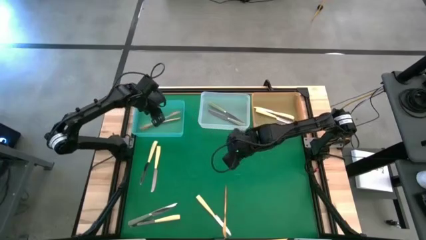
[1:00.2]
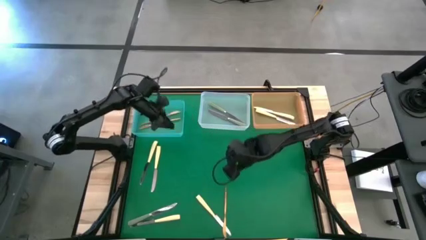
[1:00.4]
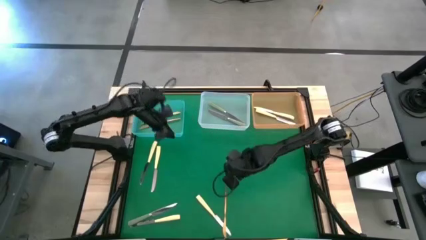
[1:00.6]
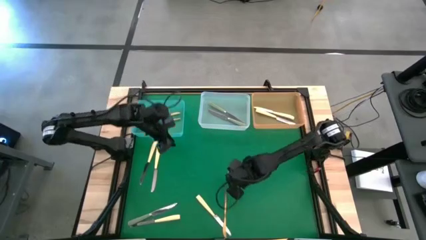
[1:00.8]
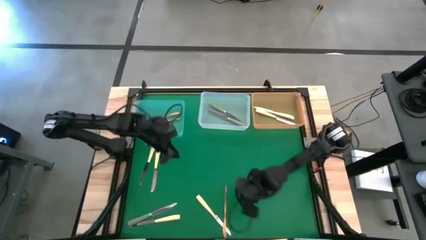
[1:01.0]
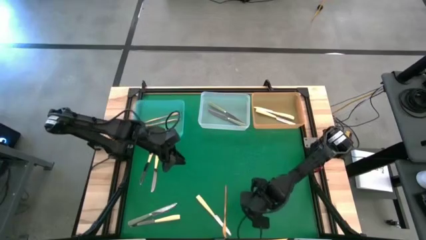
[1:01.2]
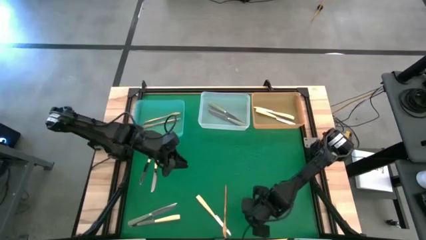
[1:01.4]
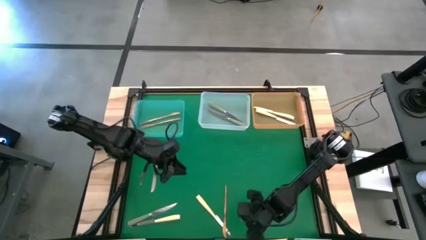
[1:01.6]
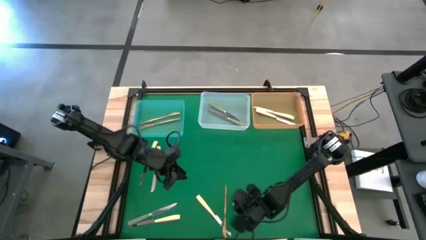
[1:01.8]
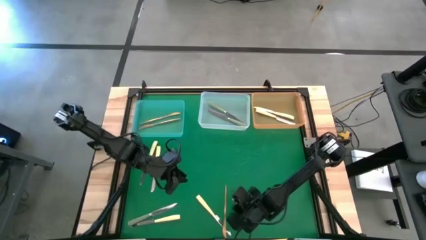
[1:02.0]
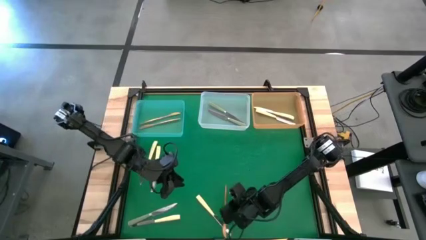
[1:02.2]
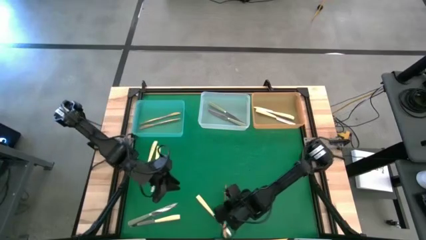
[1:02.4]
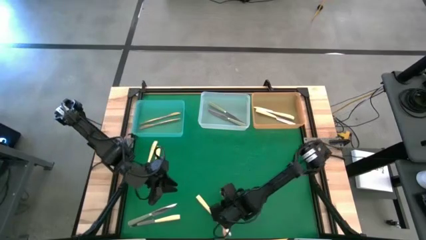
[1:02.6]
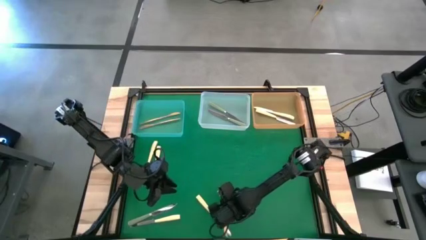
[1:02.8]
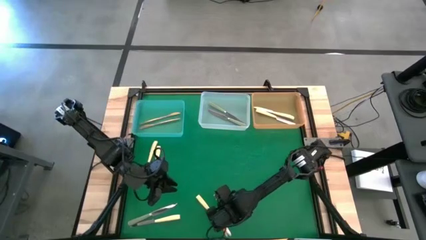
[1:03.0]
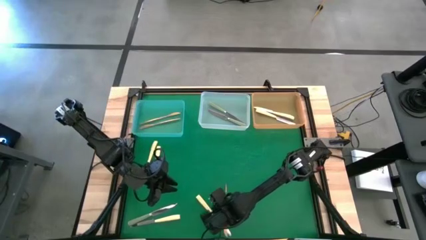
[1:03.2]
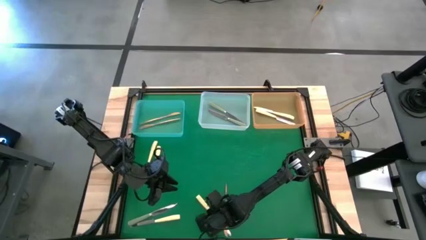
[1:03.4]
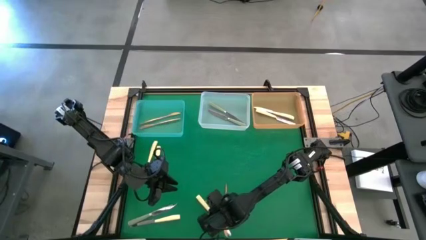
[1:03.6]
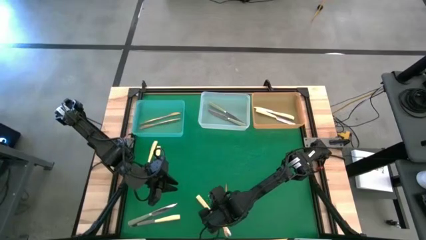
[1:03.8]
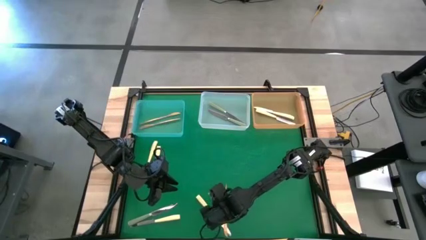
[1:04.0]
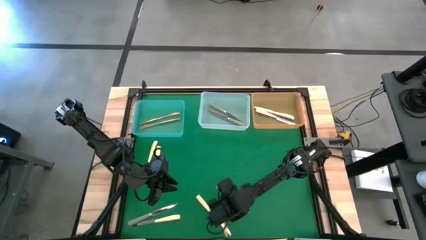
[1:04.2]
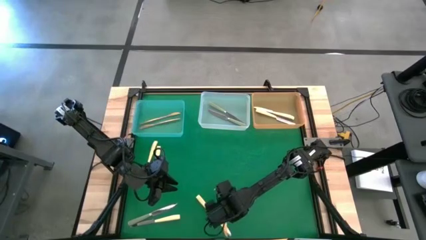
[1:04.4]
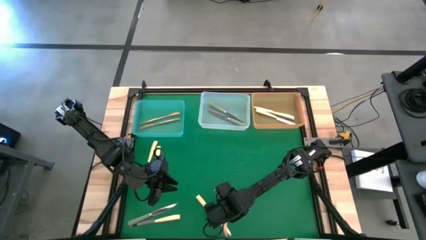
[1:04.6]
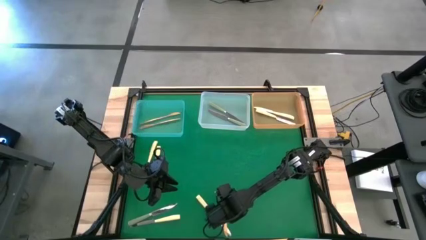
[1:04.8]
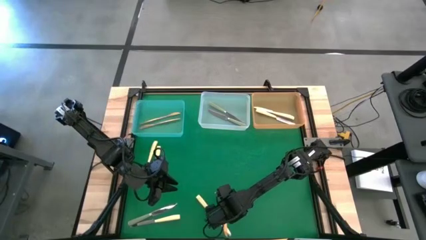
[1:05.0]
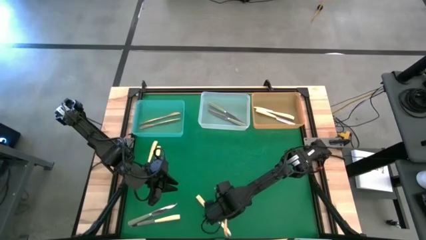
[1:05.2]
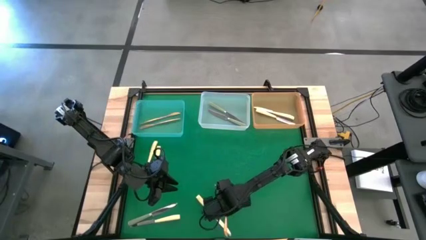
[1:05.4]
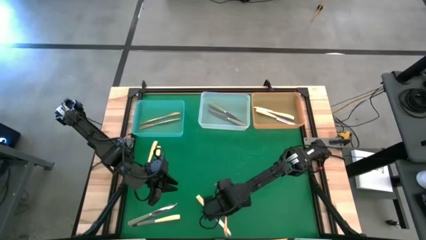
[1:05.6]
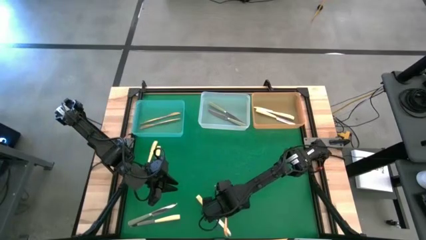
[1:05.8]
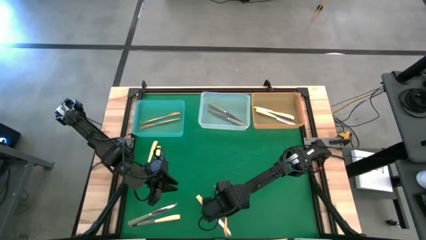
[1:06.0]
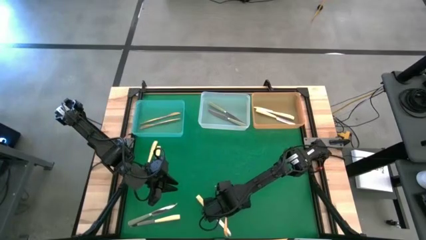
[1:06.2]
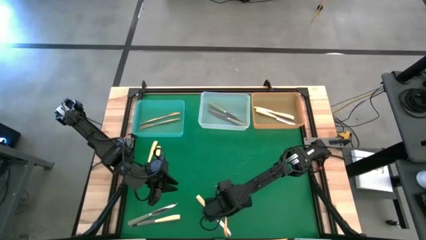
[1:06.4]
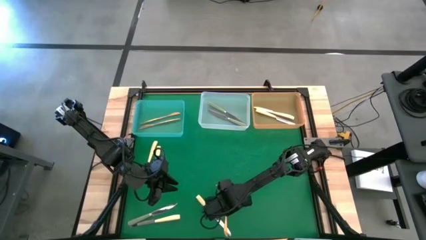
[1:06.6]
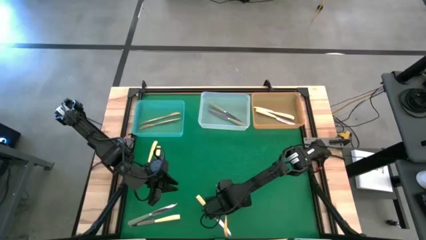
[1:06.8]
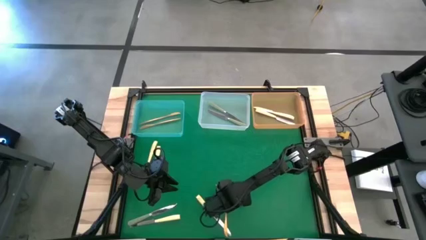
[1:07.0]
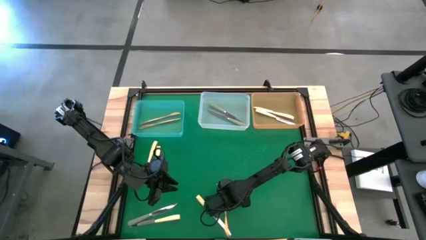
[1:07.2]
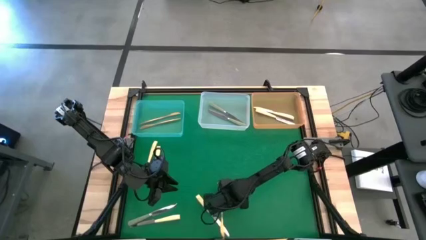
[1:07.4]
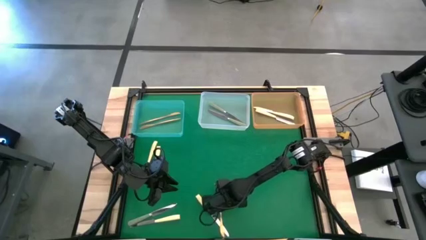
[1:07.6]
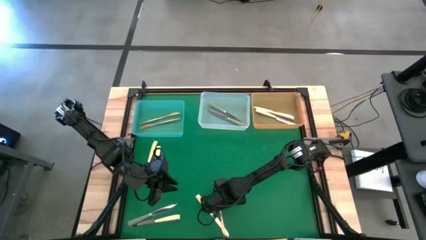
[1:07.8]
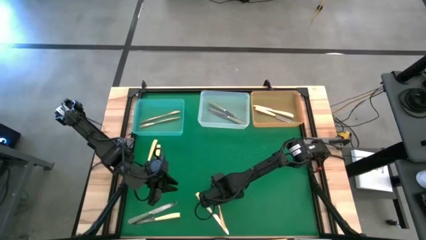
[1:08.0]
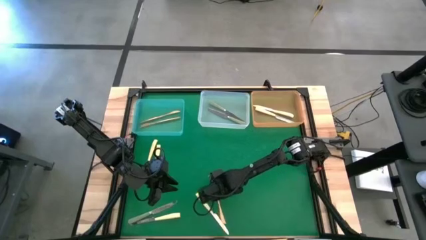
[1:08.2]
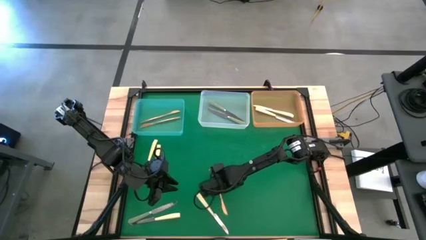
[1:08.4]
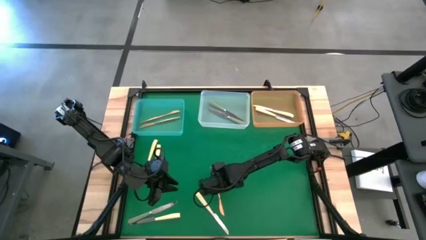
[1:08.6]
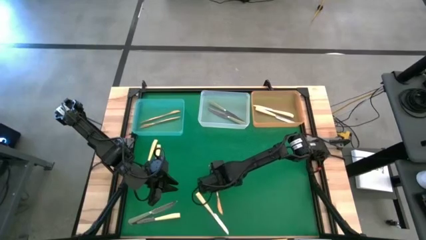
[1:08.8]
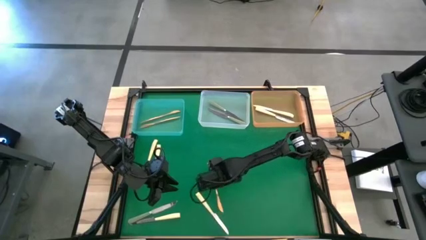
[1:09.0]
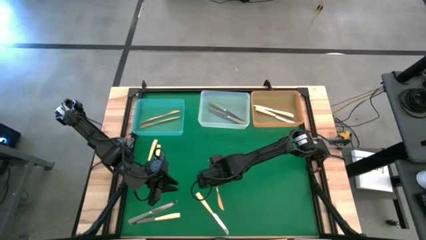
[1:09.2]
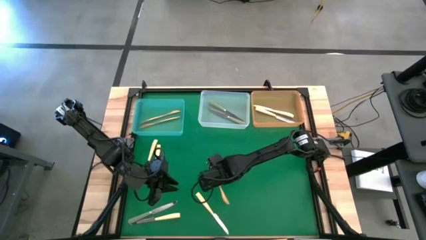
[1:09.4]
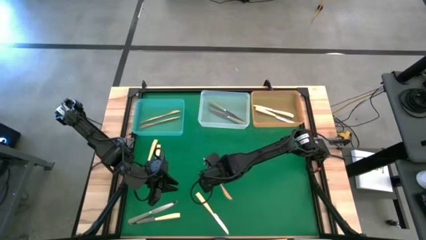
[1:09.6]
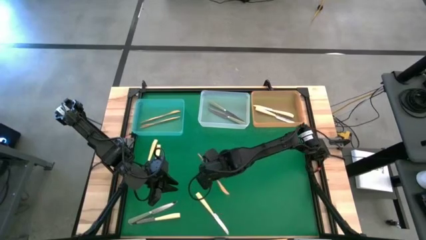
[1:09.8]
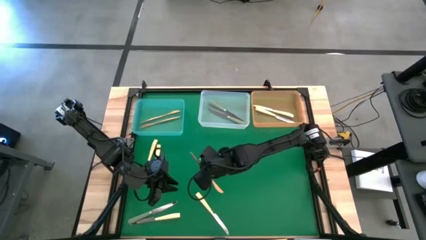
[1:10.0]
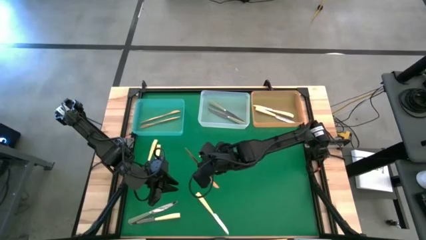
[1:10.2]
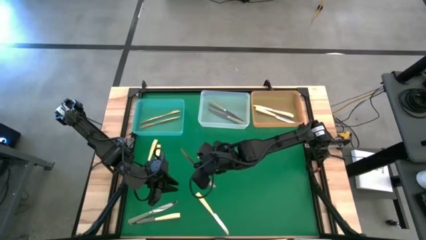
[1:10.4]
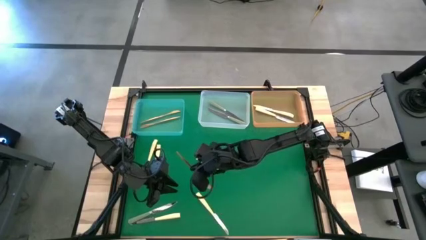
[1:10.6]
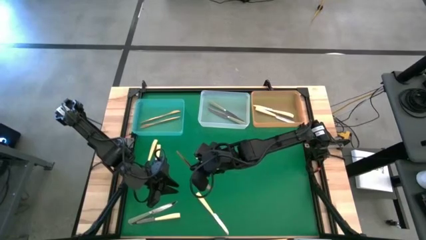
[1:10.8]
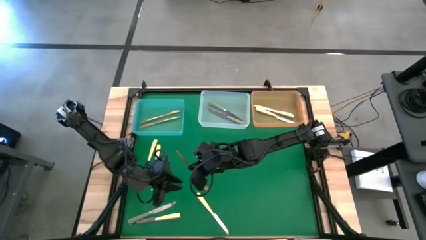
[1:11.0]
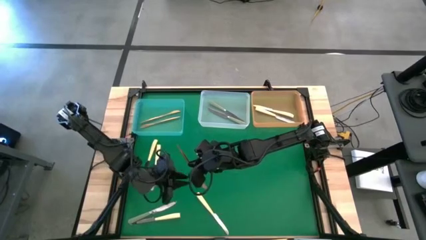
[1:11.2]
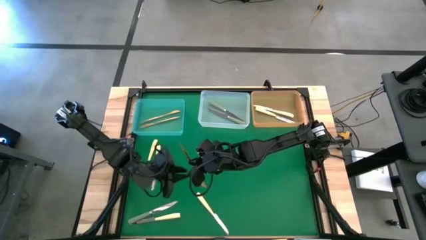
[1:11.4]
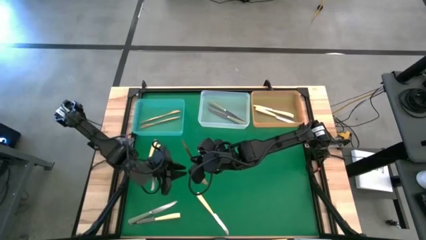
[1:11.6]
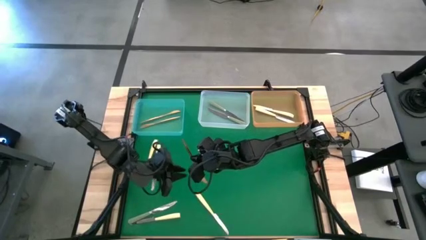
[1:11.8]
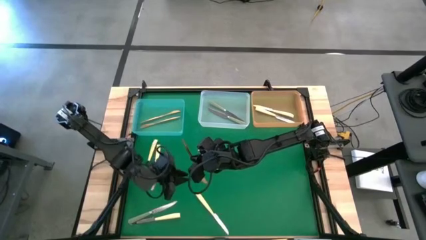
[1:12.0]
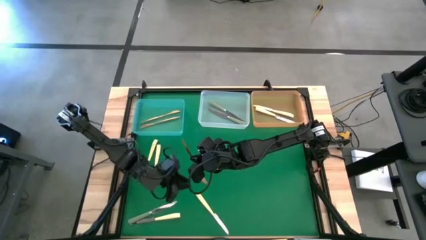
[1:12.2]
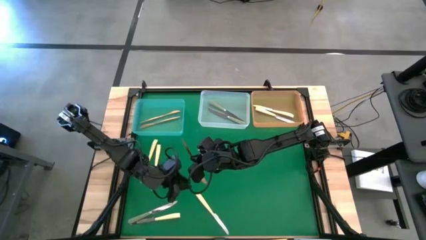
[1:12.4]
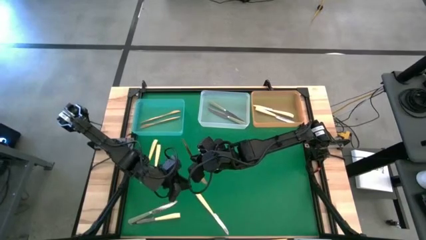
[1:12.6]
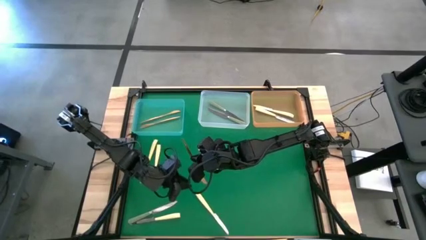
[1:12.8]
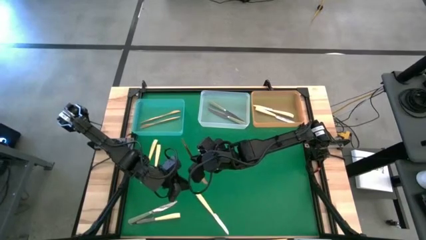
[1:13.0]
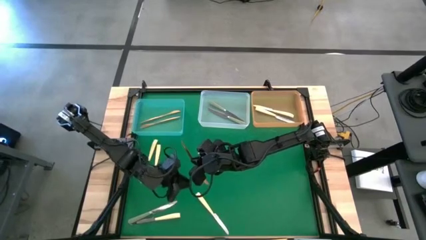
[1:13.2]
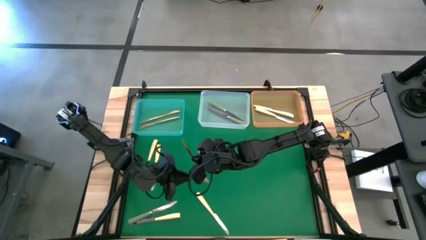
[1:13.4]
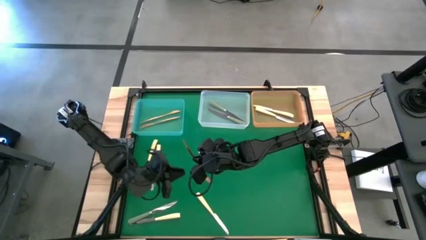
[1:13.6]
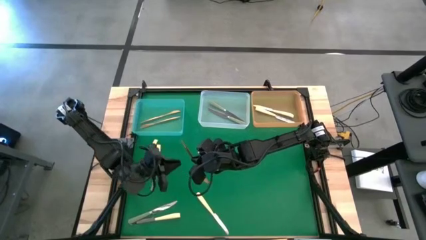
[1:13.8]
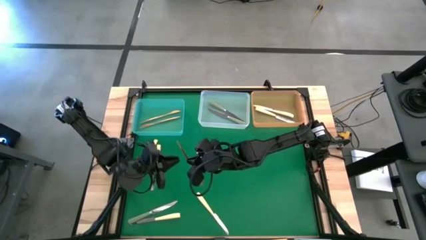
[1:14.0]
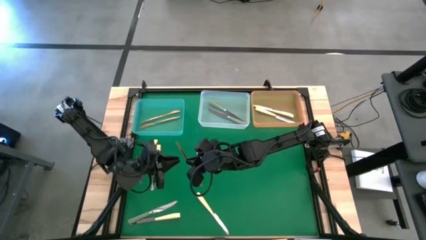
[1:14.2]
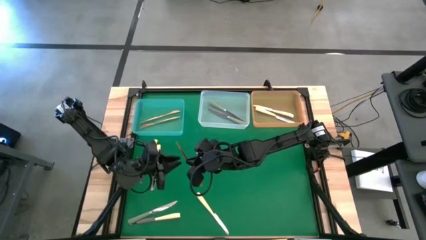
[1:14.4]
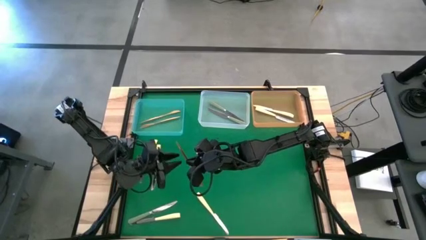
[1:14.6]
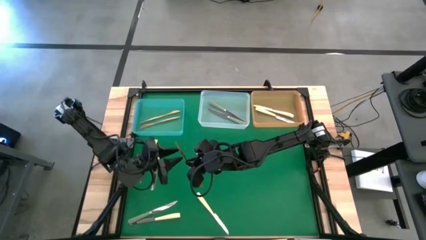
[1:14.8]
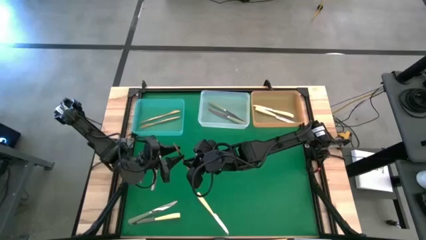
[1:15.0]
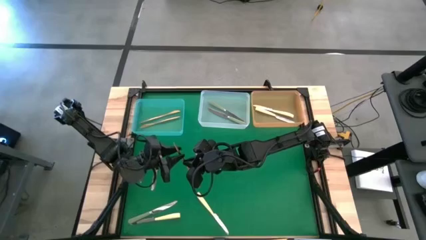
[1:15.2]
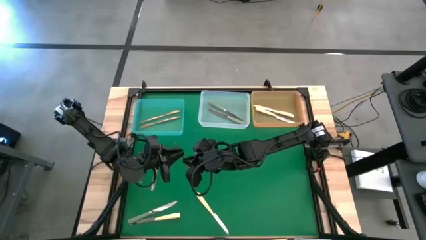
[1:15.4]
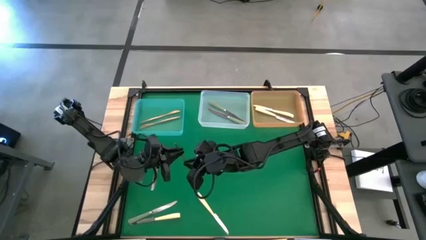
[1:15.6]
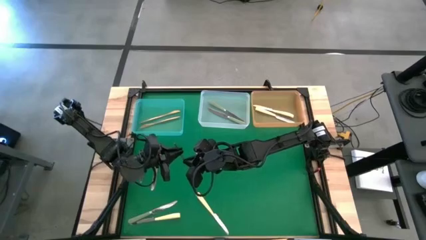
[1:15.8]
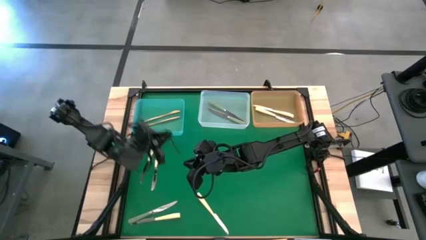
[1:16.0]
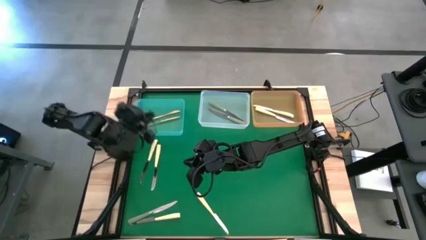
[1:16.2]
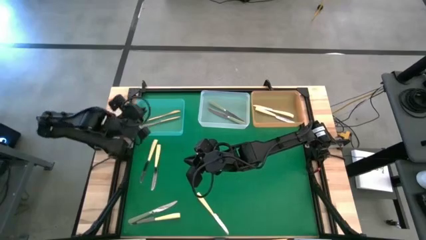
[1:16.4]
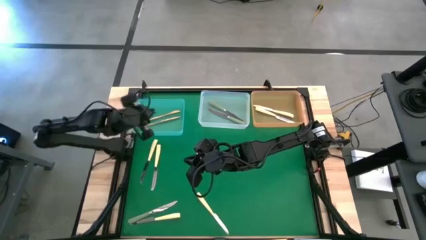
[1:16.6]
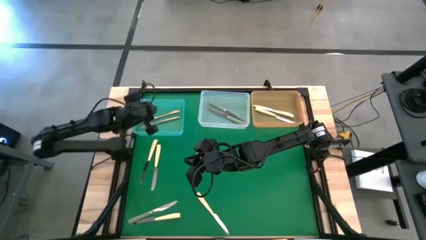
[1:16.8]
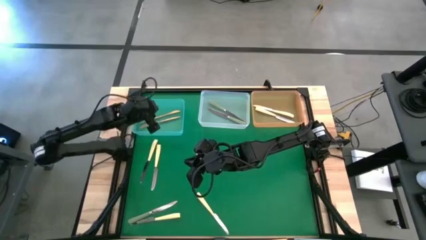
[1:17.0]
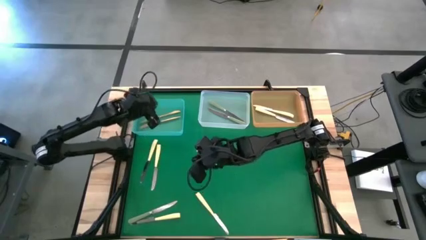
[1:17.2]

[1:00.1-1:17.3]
Task: Sort silverware by color (type)
Put the gold knife into the blue bin
